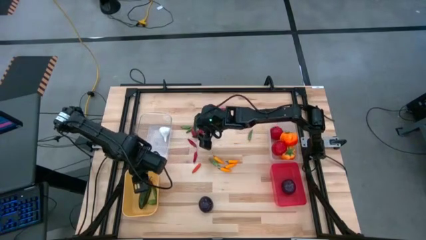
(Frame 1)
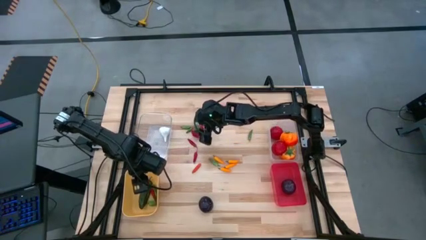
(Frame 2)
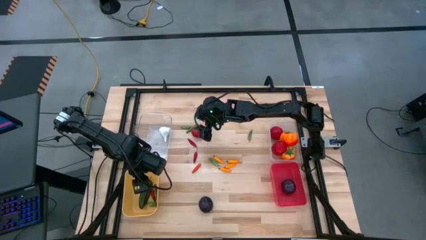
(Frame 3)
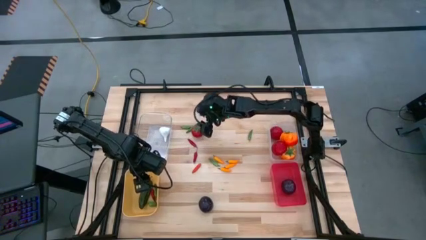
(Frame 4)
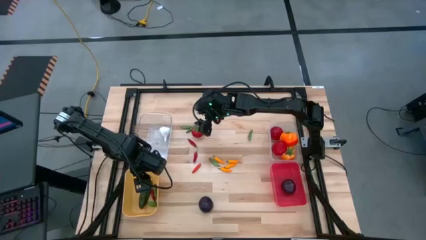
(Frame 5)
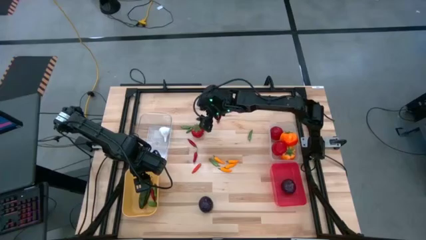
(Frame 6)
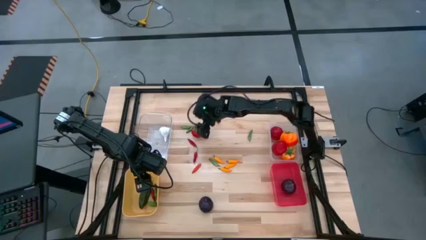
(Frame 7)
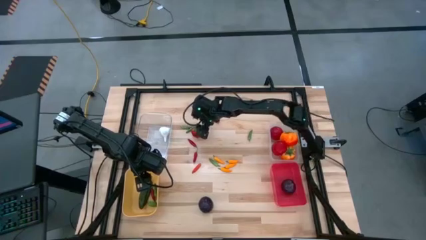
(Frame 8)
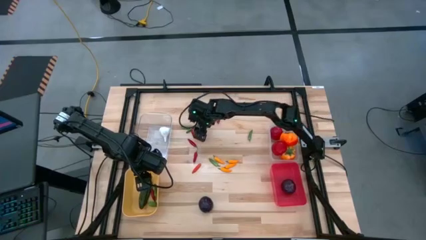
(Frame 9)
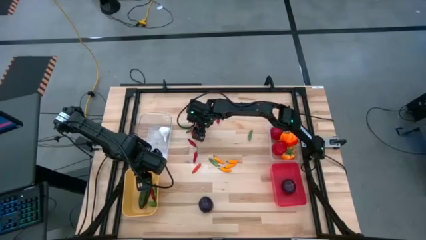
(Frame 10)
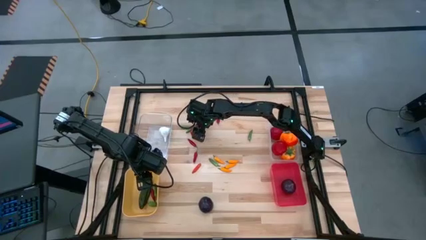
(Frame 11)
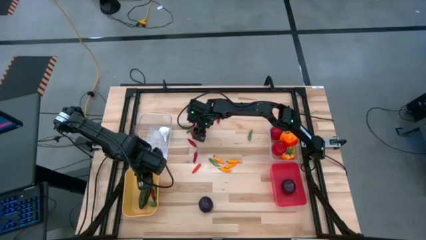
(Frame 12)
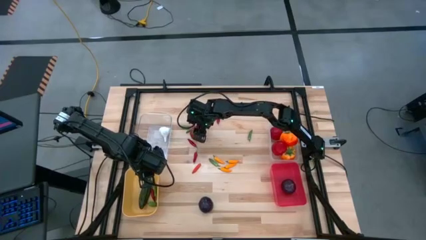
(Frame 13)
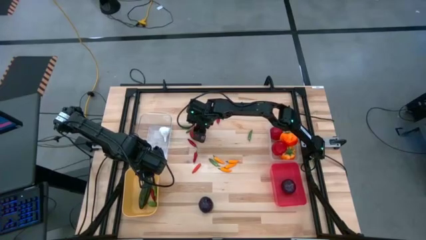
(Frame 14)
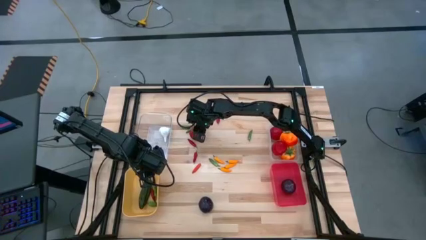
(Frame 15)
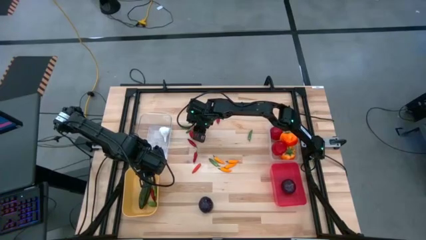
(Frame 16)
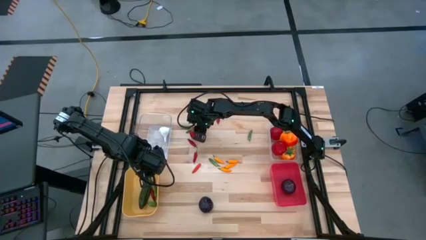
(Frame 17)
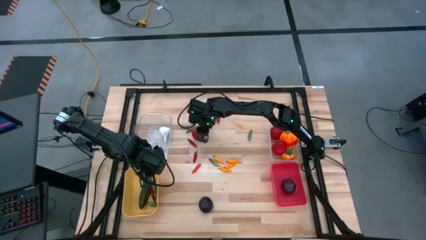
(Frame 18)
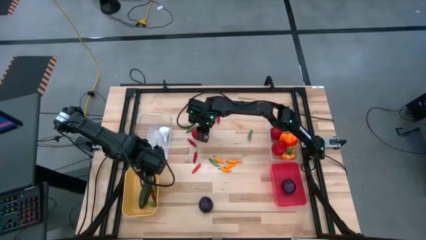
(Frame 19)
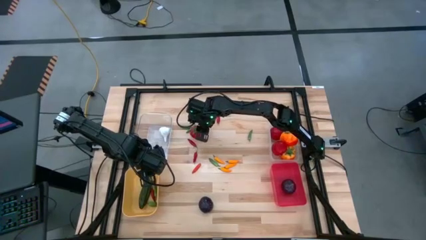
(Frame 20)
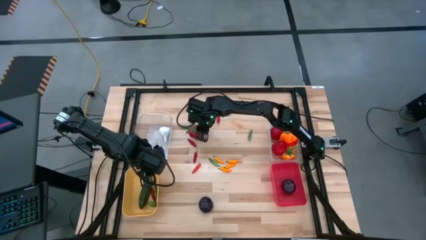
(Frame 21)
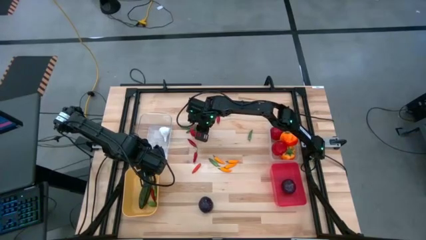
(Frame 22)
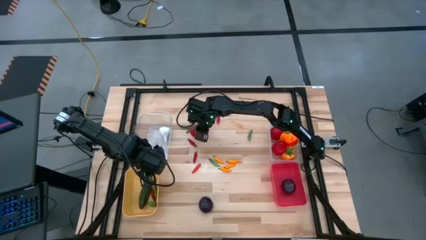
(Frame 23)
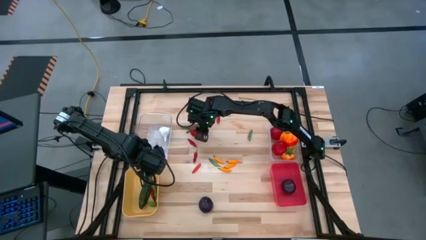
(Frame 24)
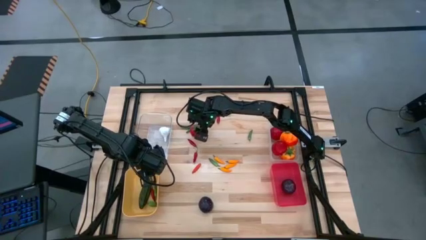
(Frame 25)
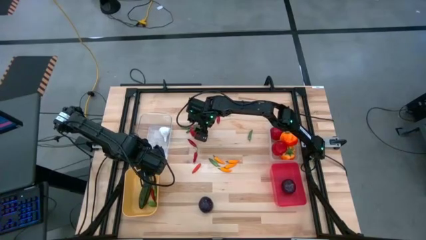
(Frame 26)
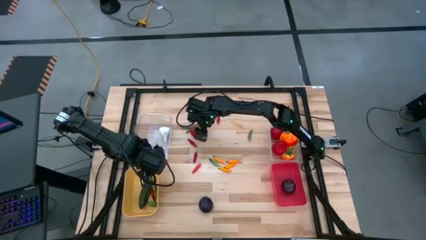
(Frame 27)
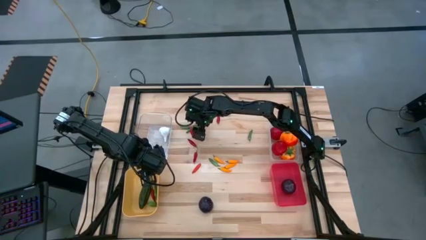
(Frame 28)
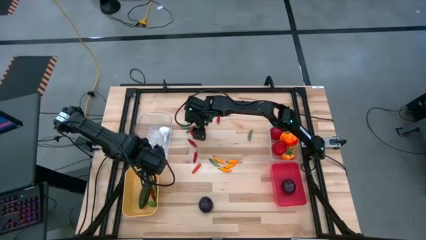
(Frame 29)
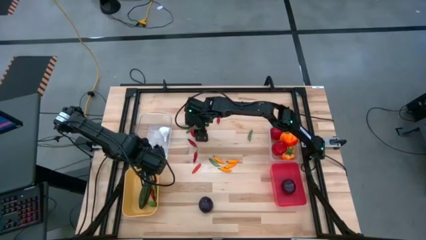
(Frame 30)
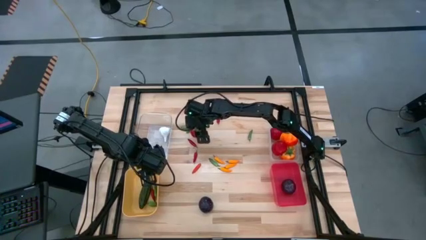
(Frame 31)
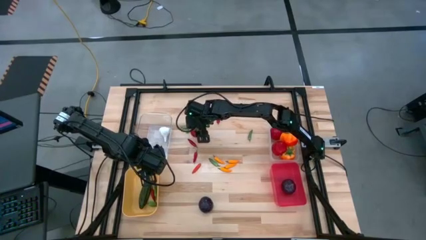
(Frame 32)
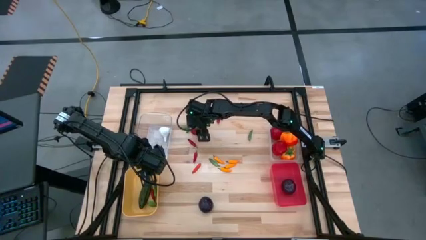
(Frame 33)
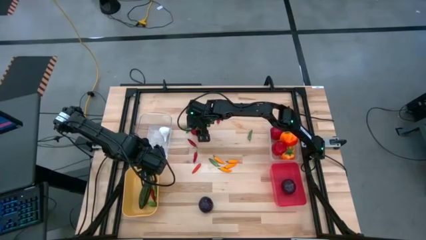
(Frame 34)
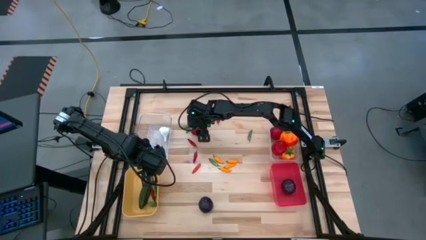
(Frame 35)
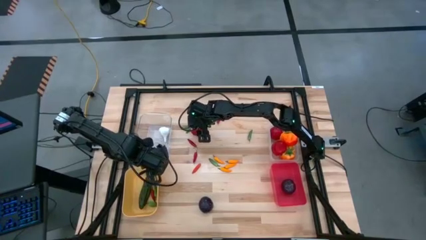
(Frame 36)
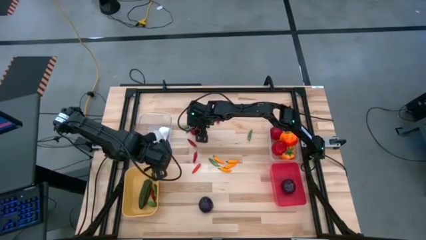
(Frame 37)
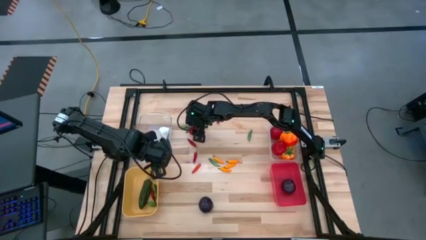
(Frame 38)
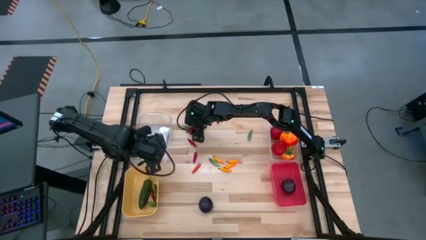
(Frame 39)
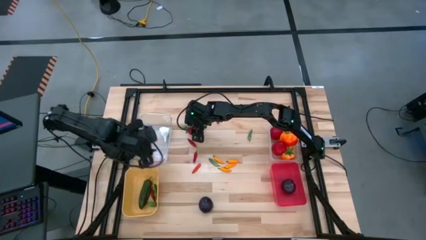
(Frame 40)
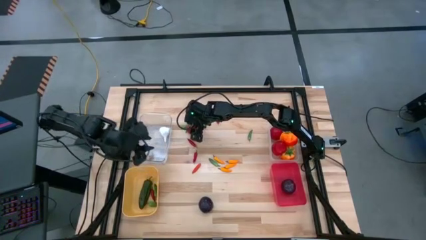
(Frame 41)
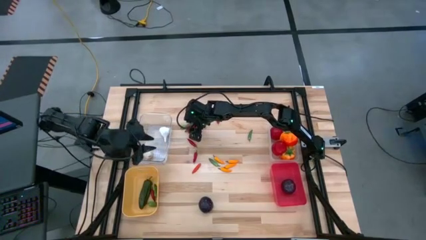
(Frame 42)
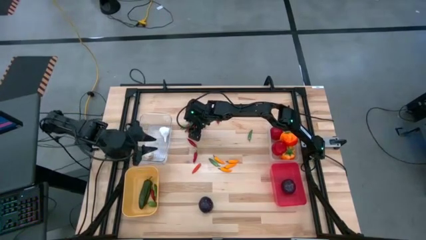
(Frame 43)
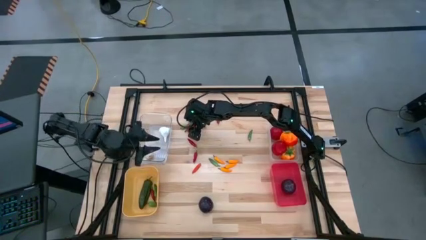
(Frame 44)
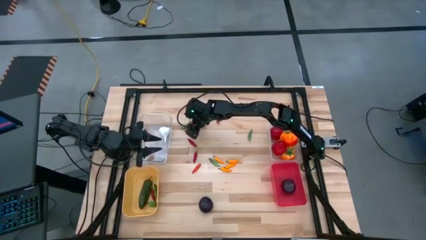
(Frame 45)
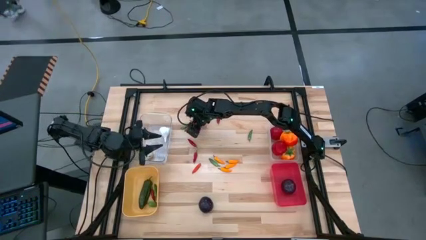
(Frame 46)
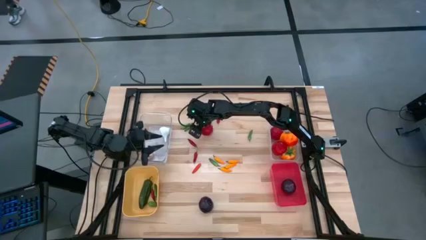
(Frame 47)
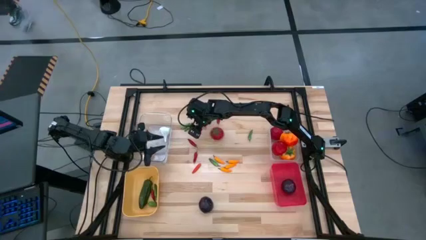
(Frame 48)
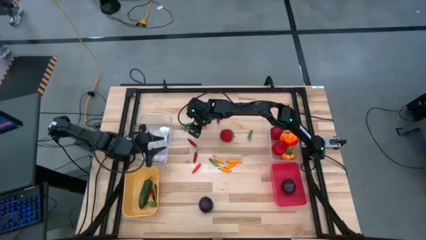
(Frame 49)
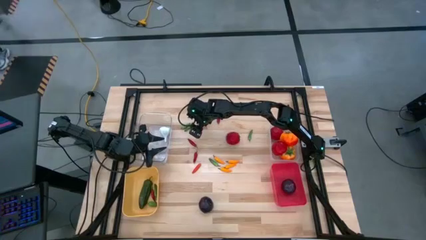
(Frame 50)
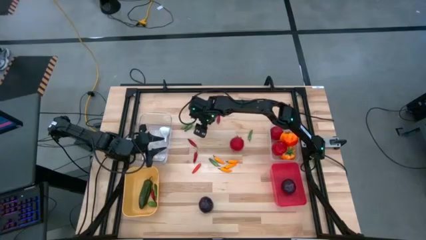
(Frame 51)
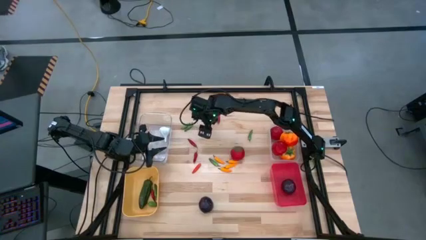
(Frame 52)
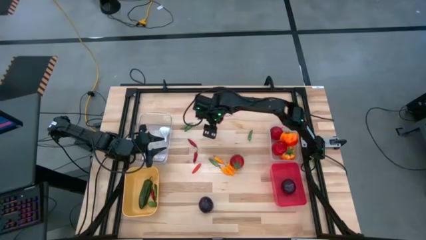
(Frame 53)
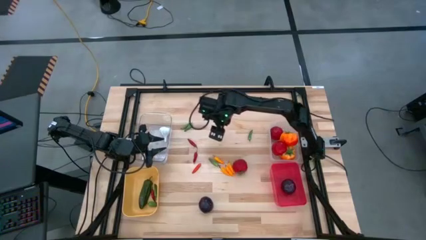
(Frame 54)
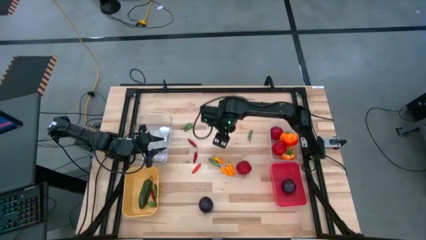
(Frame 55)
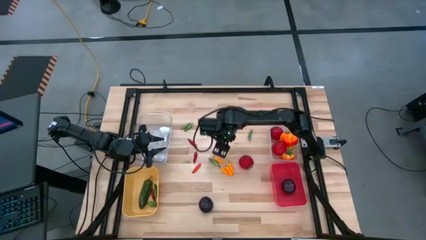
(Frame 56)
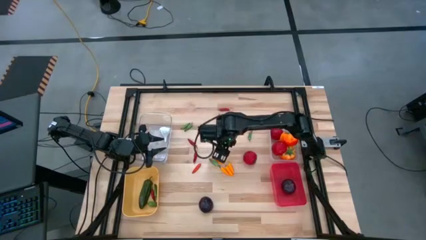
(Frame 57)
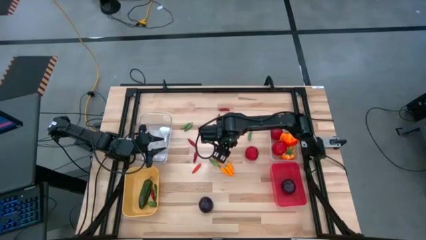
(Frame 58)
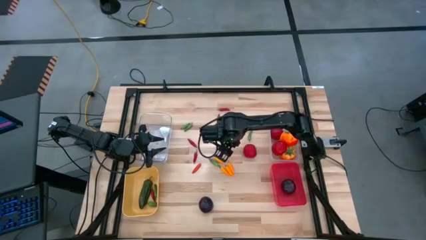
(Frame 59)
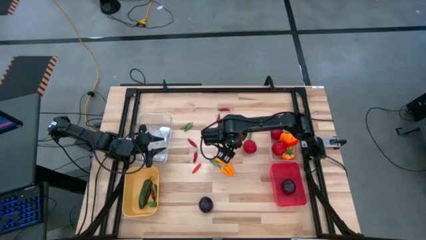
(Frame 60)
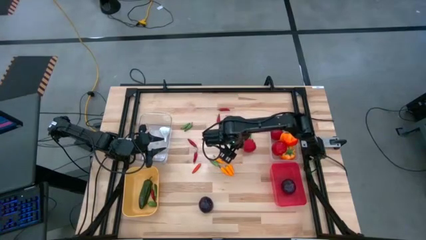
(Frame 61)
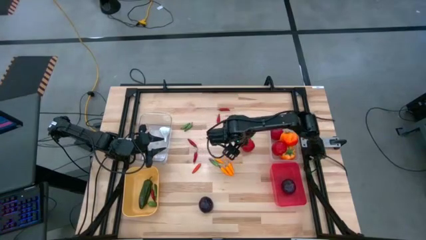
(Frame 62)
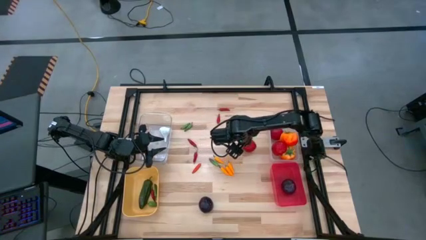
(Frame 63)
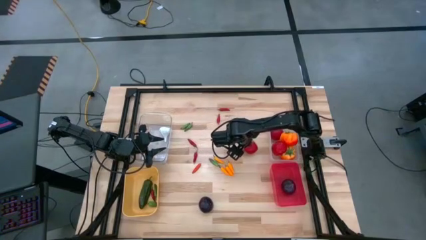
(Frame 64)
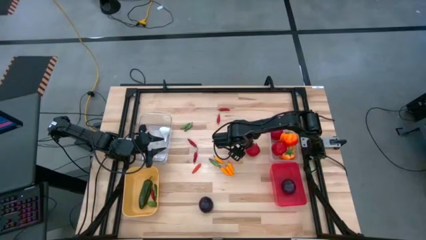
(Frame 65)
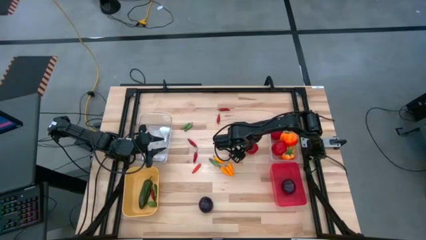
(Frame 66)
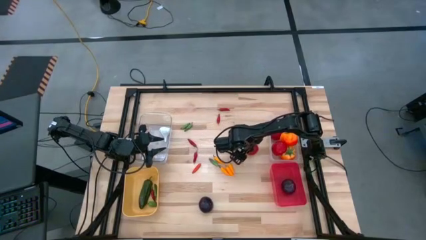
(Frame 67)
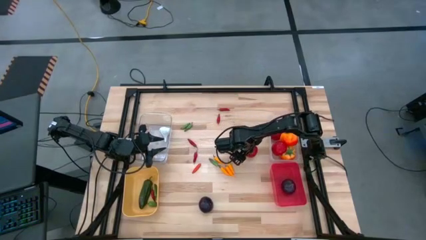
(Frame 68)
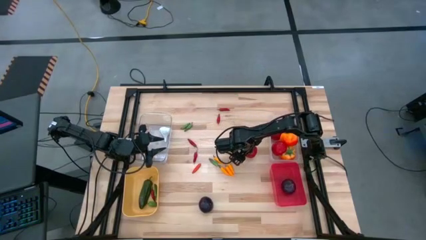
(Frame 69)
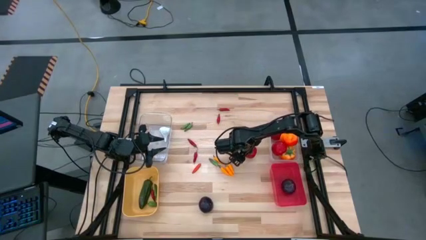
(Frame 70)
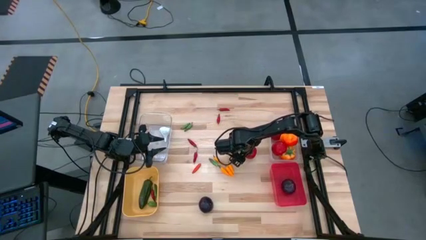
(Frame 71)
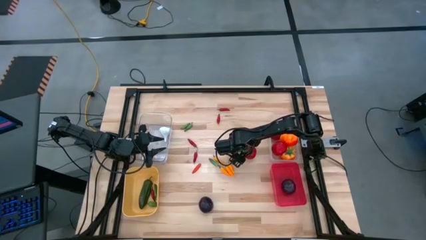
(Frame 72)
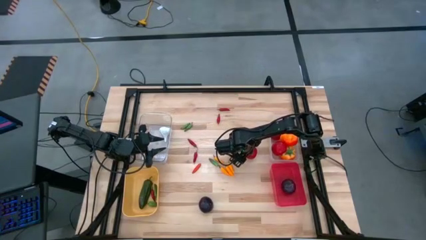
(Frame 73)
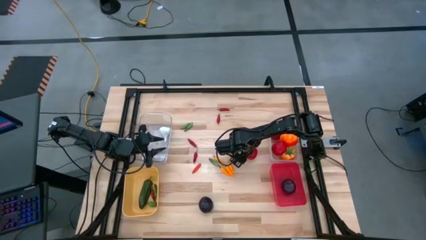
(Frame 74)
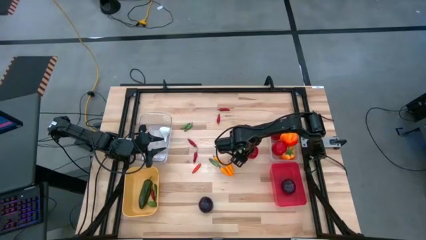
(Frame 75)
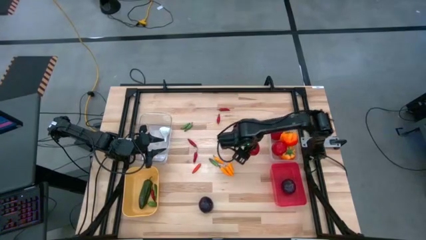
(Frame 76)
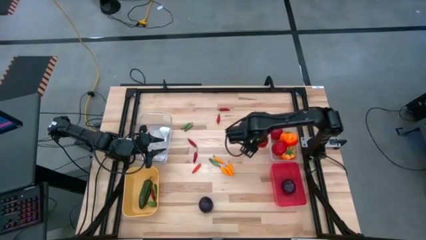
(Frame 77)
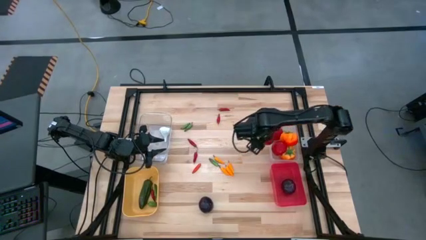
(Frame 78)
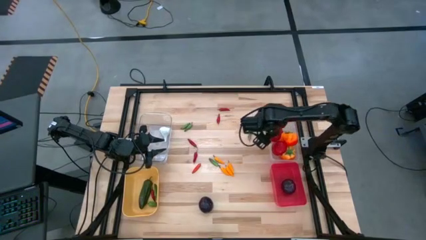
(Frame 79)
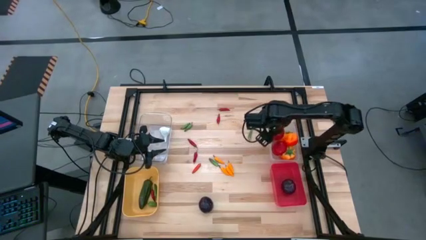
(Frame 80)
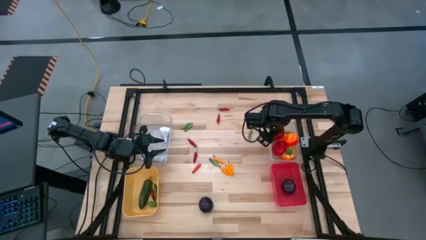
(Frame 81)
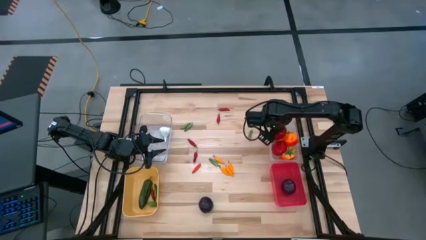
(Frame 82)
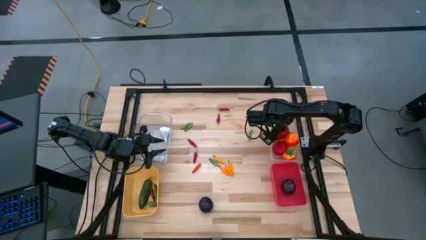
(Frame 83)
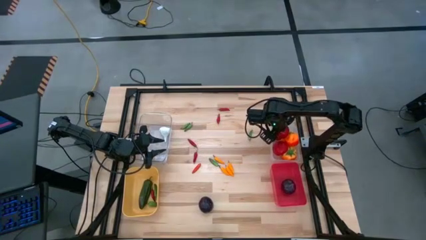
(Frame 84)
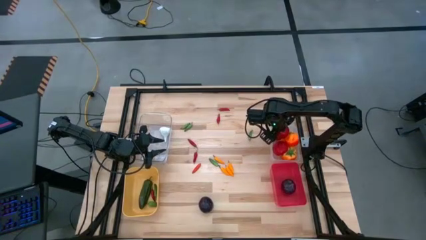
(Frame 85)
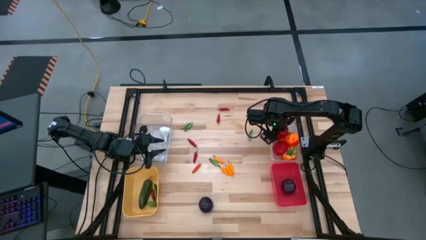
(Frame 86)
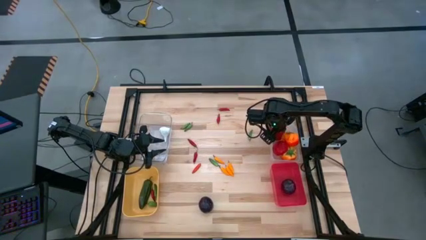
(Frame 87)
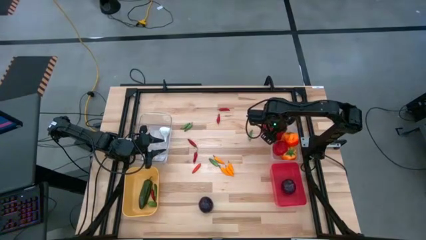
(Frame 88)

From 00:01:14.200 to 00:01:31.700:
Task: Sort produce into baskets
Put the red tomato into the right transparent bin
